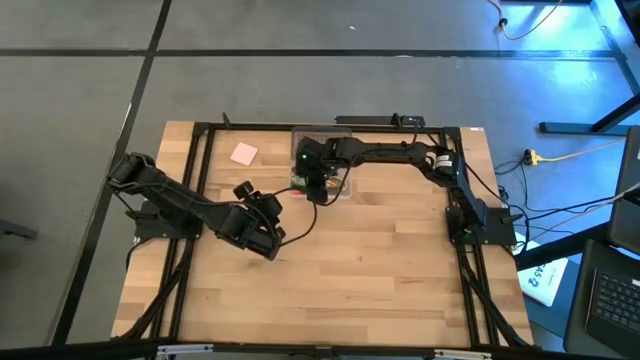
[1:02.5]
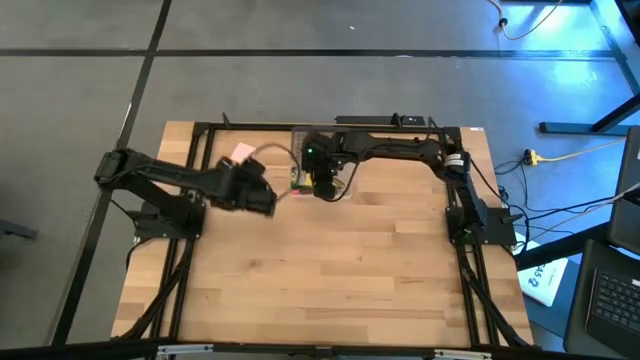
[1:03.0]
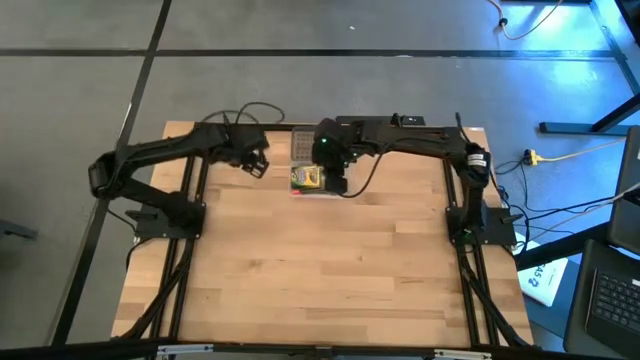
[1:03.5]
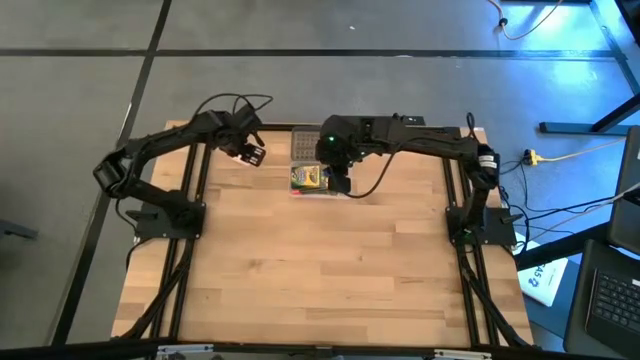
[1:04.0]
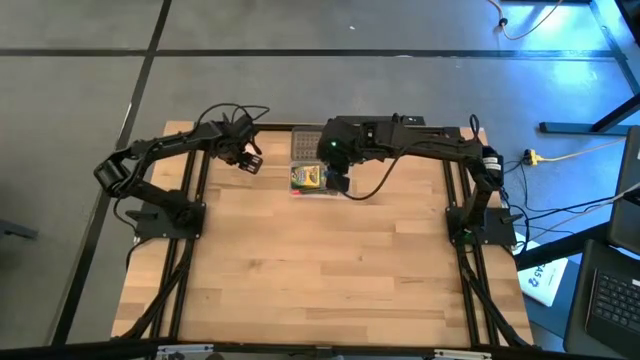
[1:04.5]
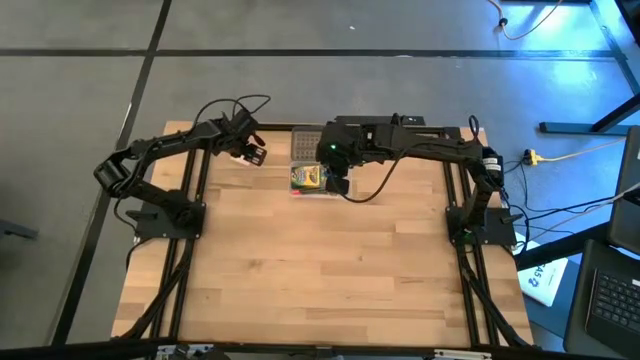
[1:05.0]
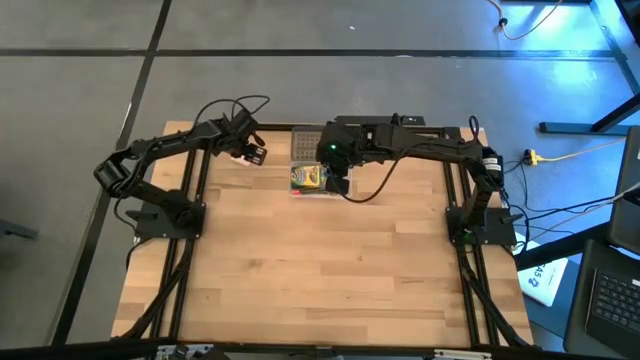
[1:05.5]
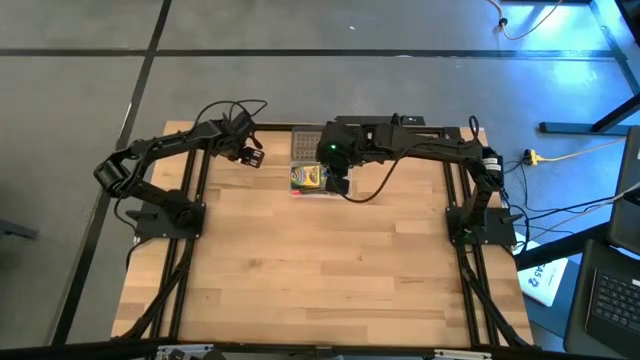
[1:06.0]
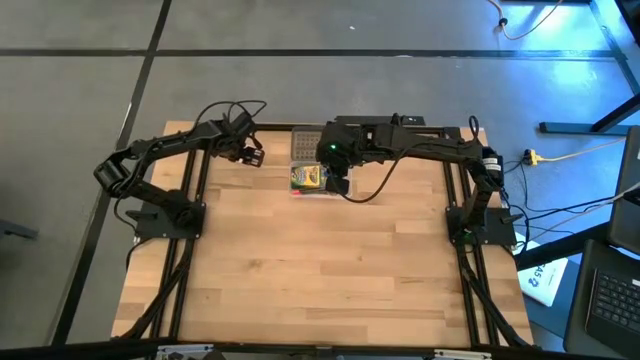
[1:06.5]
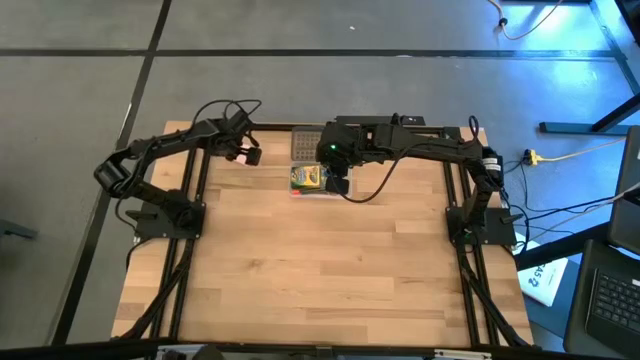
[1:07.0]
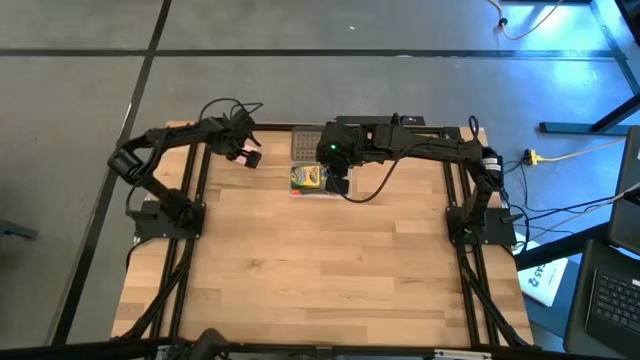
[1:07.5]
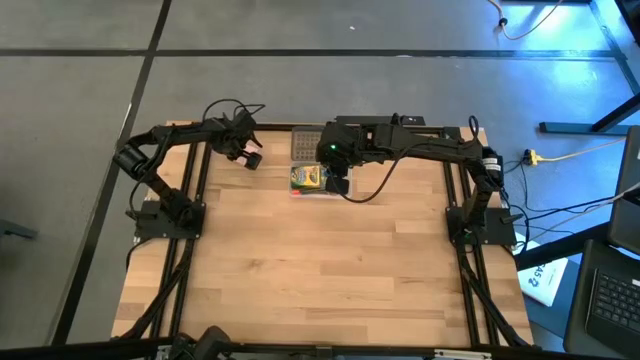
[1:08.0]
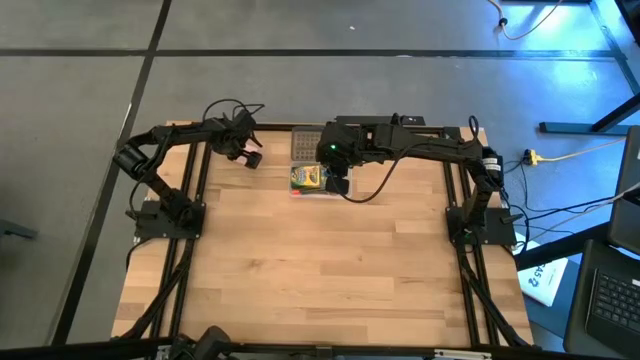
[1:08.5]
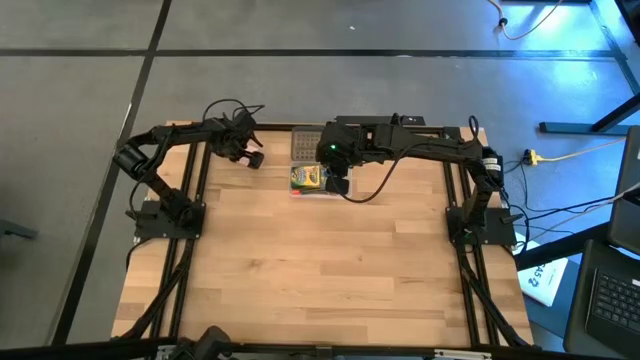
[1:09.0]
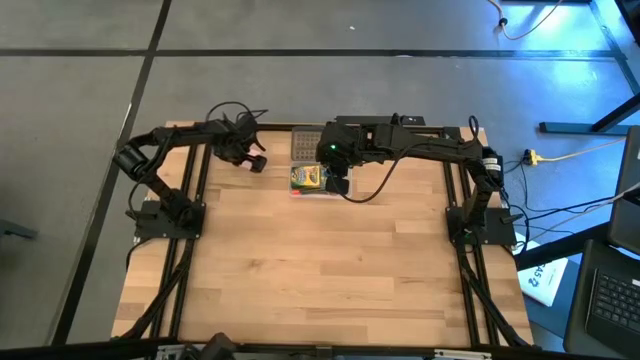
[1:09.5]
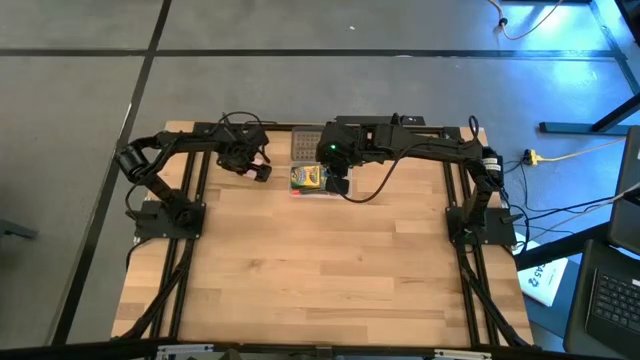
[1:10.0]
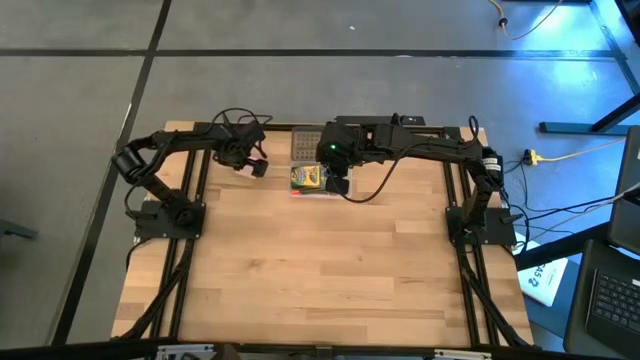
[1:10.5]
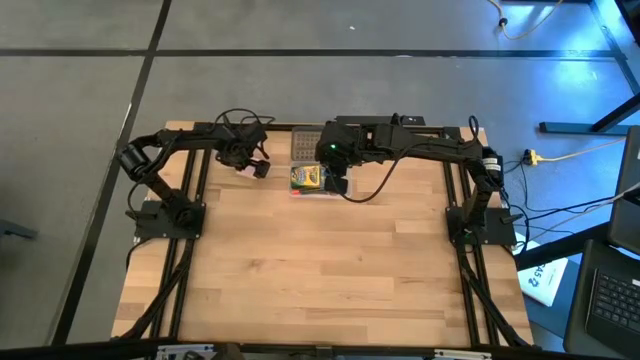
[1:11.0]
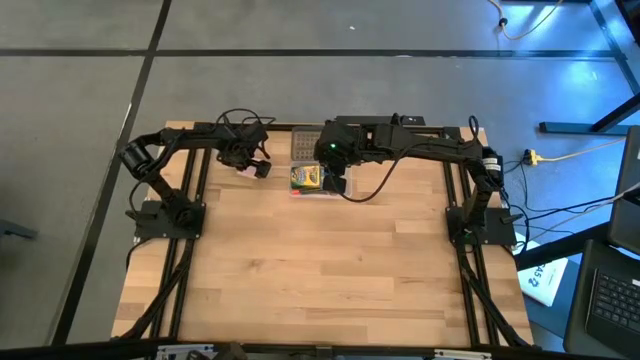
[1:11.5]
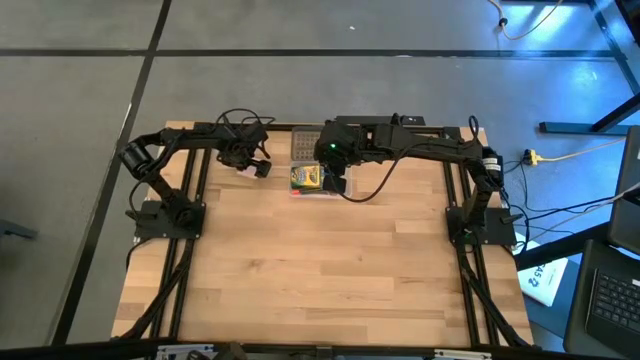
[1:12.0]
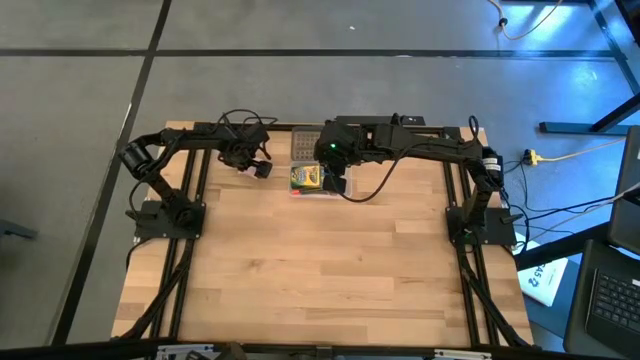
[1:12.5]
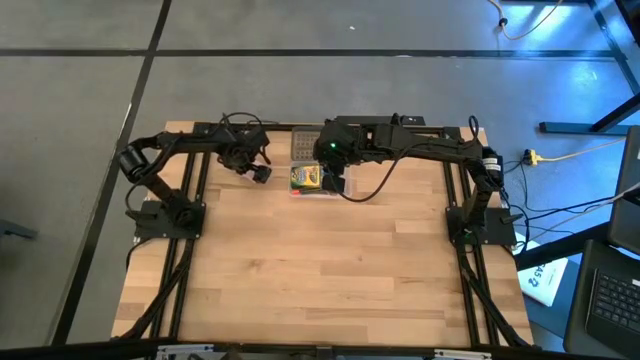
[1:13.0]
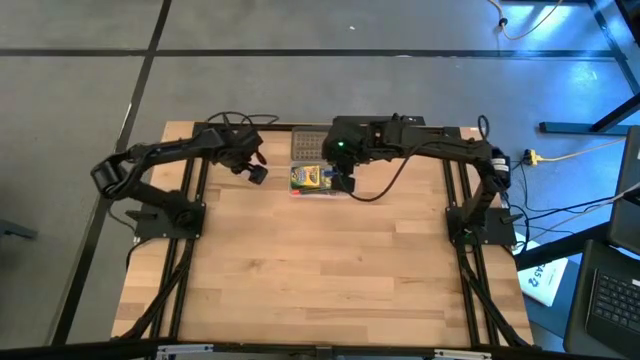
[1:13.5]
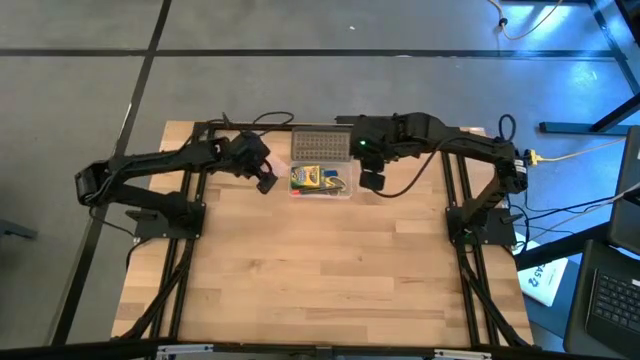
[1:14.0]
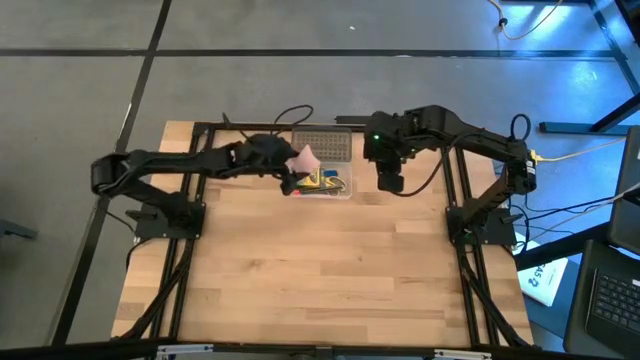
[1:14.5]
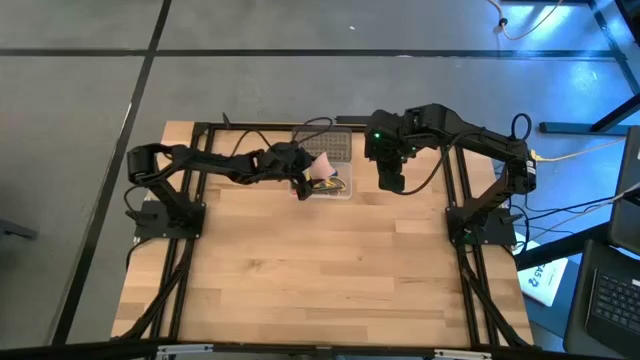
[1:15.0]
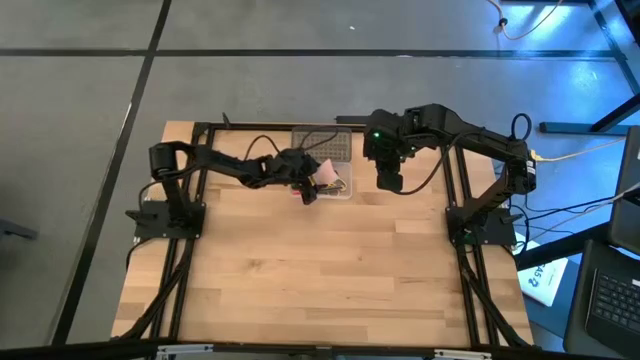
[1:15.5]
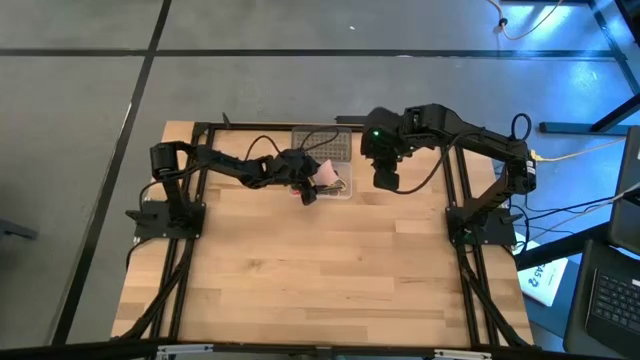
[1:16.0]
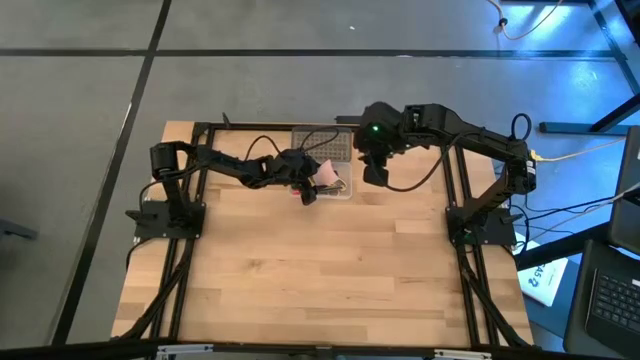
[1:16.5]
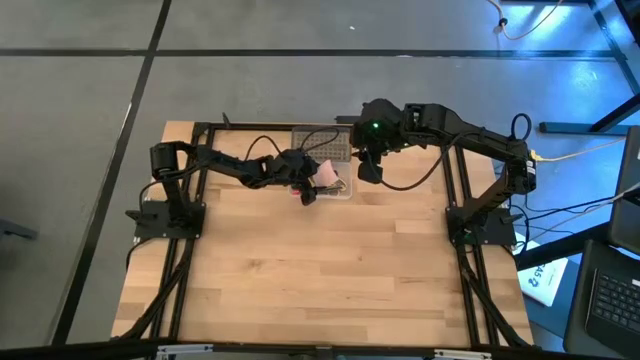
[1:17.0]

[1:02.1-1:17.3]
Task: Pack school essentials
Put the light pink sticky notes into the black supply box

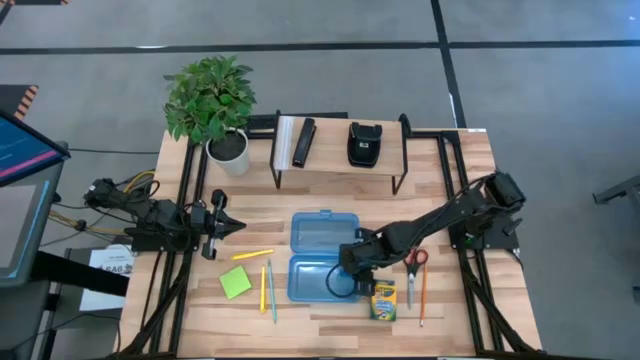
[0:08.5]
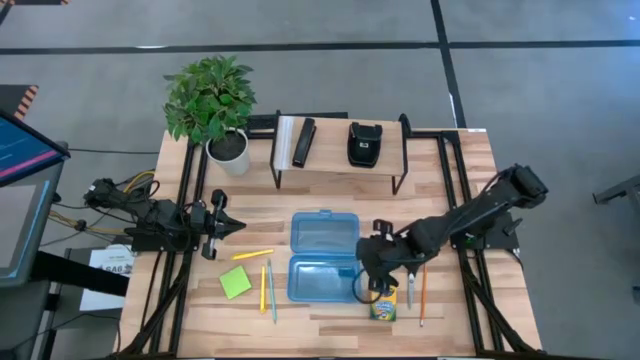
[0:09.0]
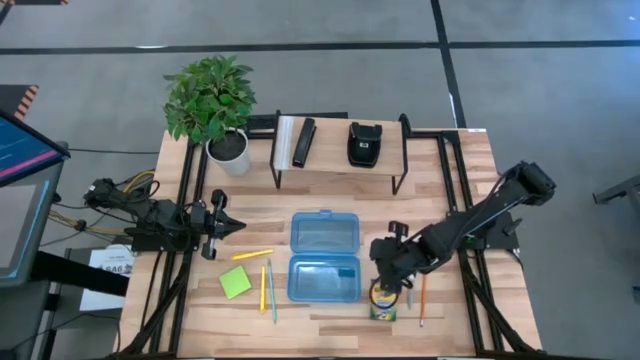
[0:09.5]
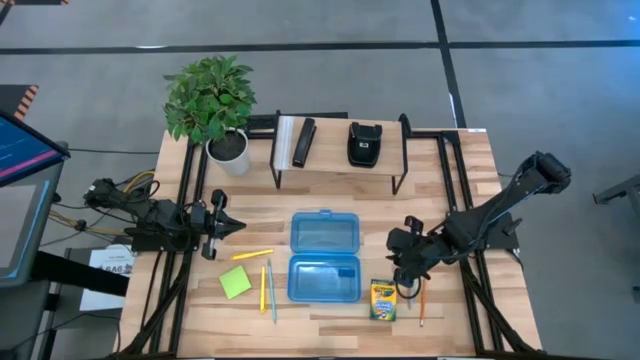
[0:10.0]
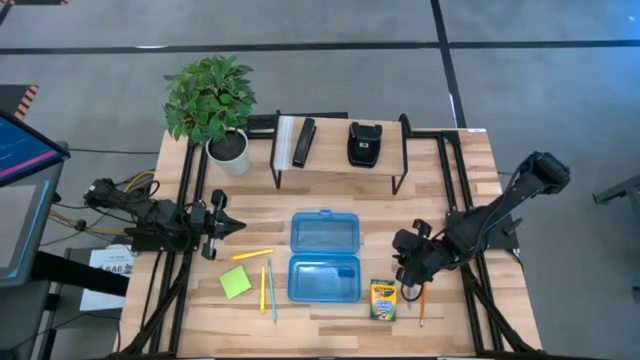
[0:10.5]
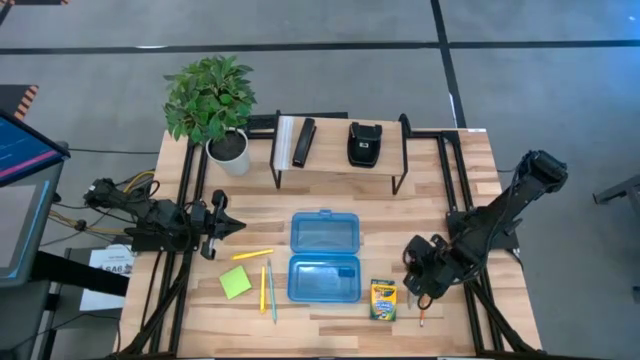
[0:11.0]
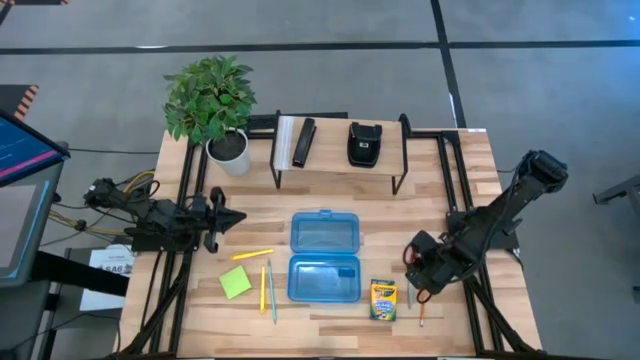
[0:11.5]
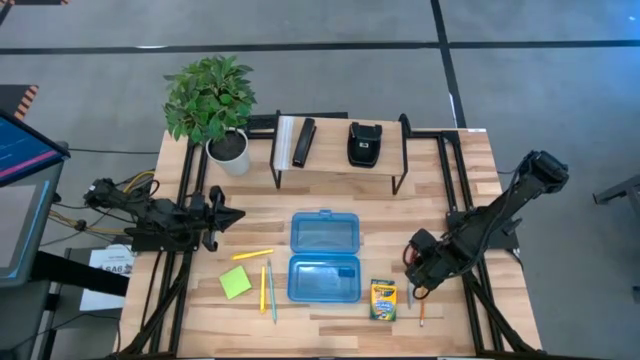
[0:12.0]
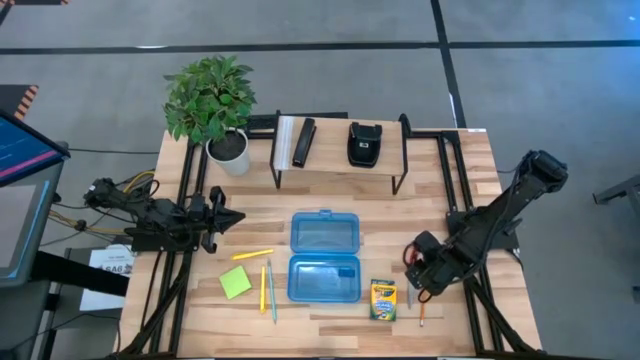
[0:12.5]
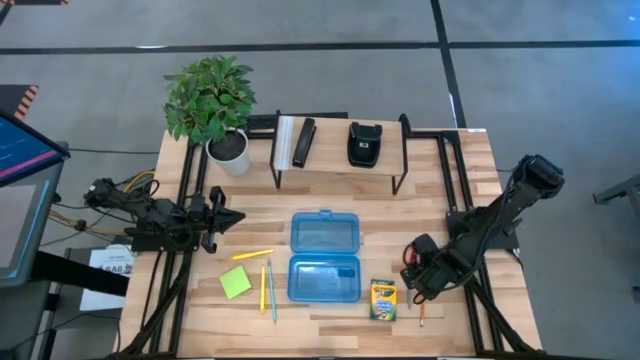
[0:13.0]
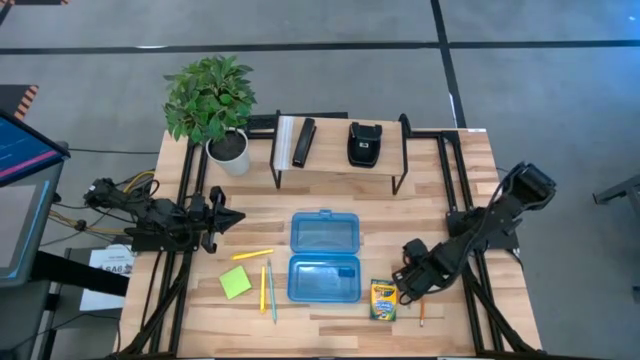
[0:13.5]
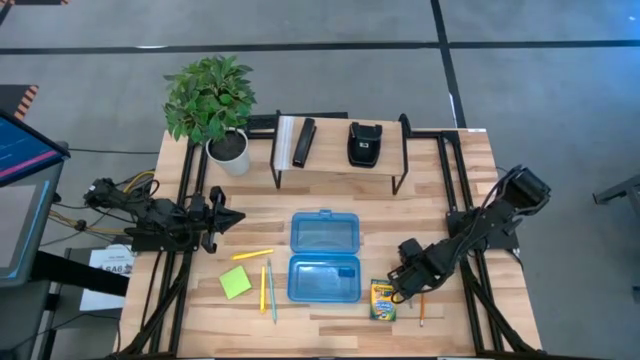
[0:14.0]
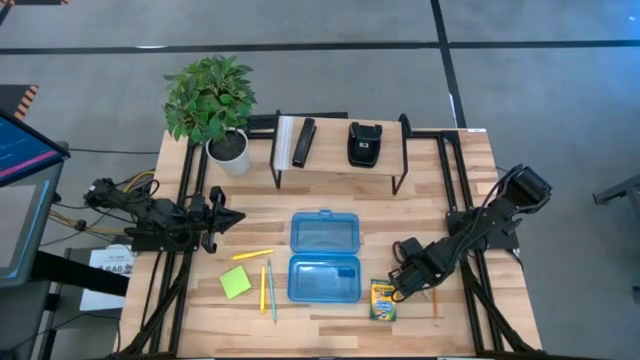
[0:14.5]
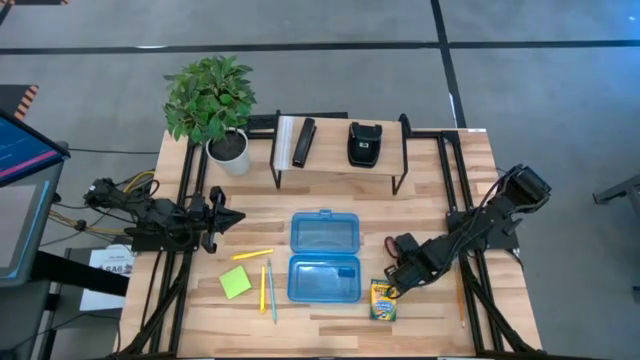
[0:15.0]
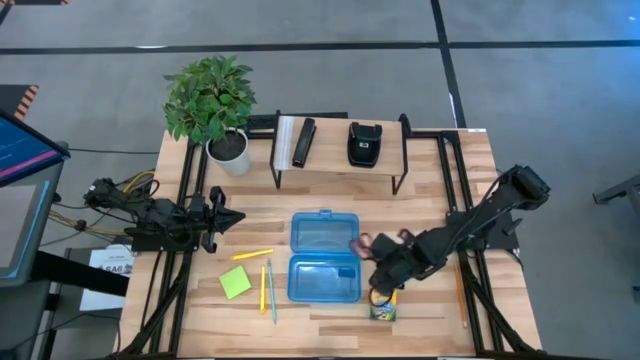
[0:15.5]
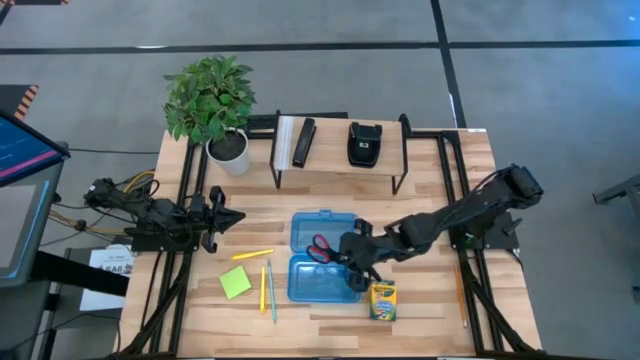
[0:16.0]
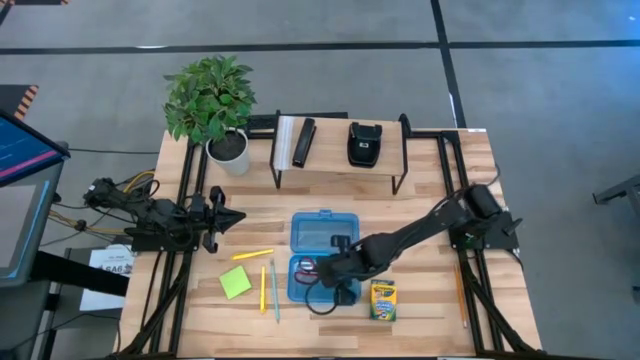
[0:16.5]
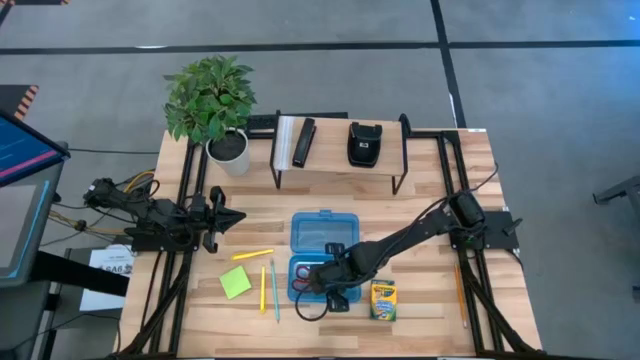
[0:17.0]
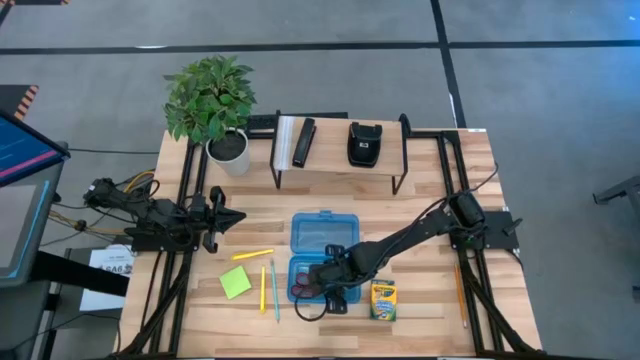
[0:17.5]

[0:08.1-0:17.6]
Task: Pack school essentials
Put the scissors into the supply box
